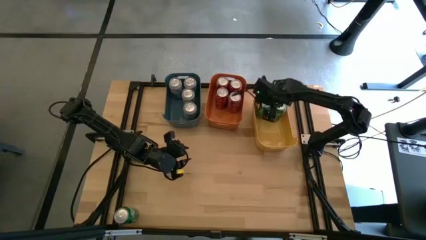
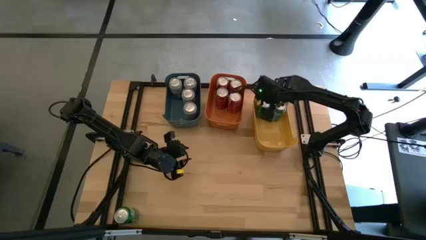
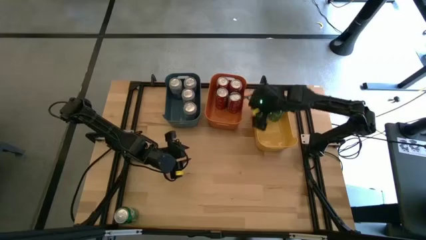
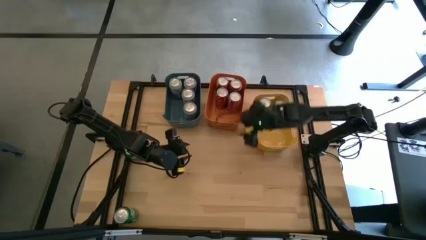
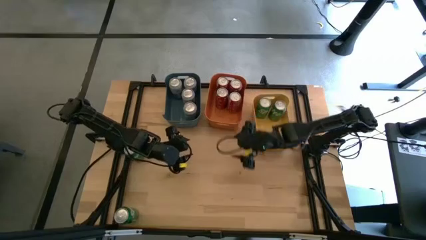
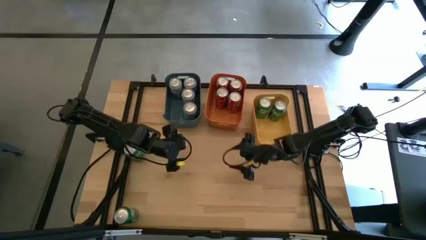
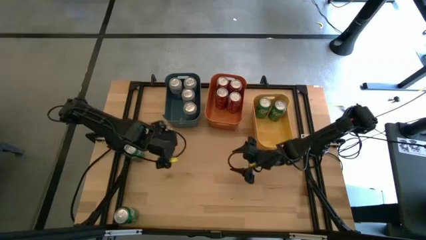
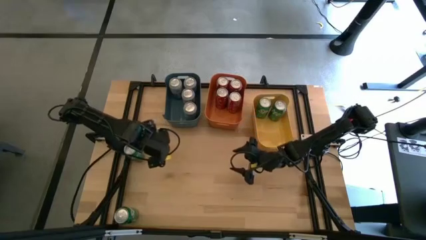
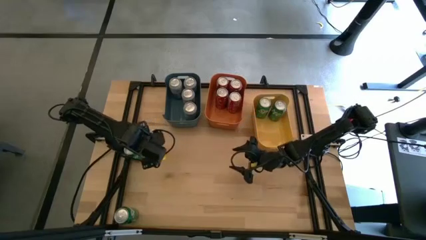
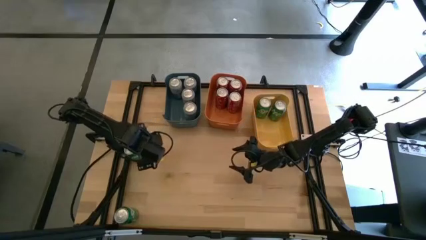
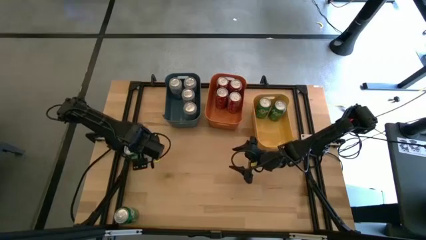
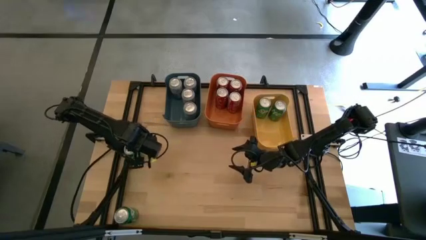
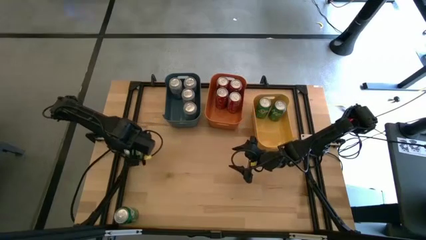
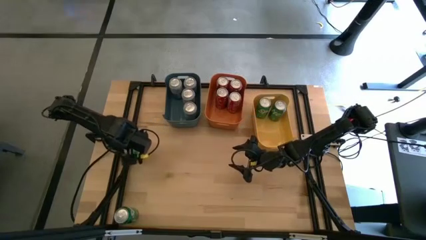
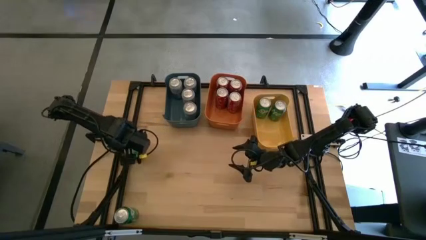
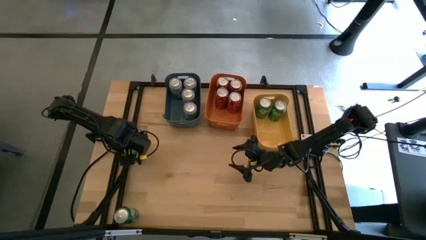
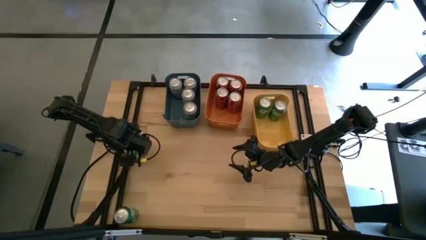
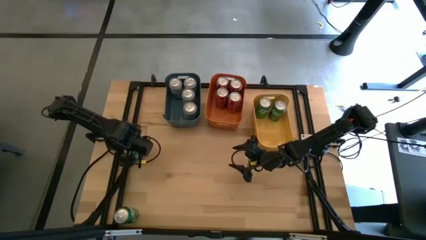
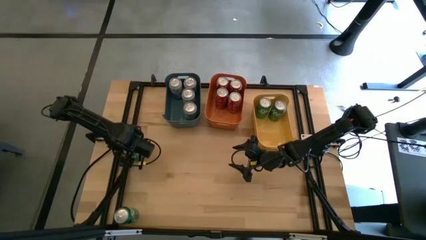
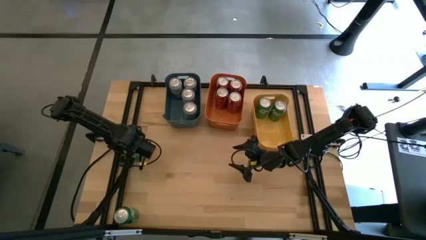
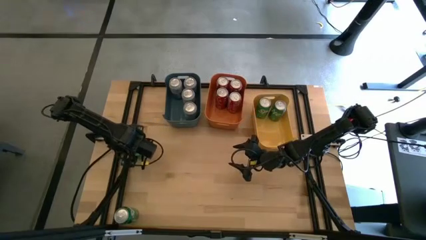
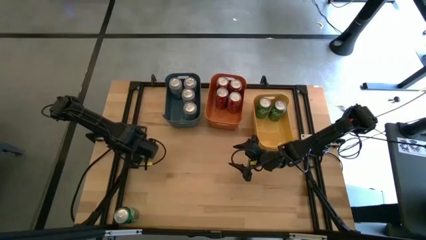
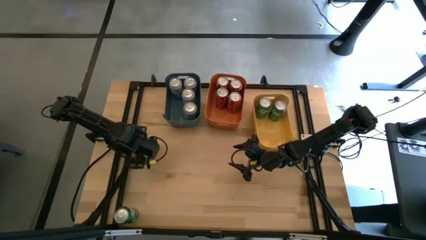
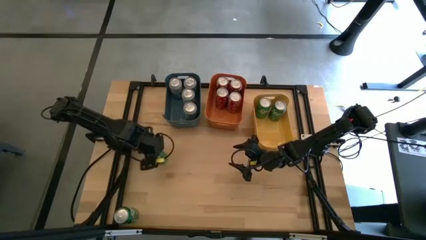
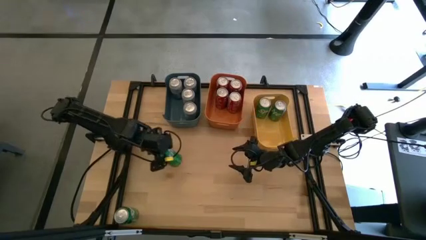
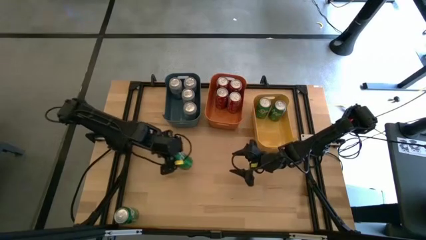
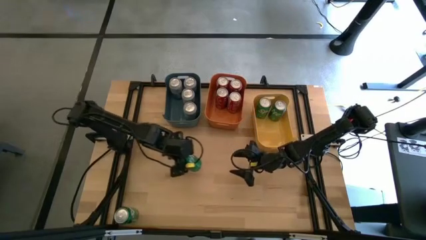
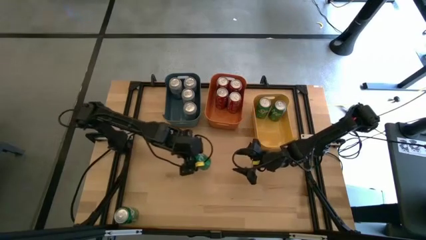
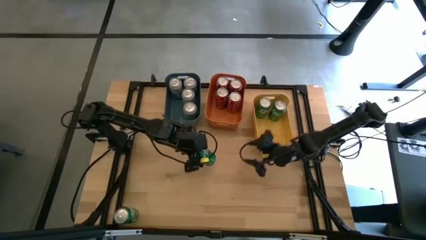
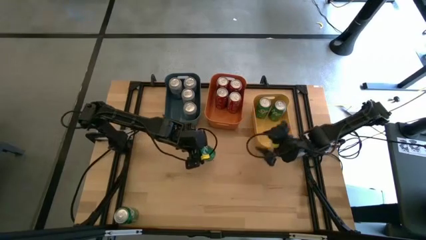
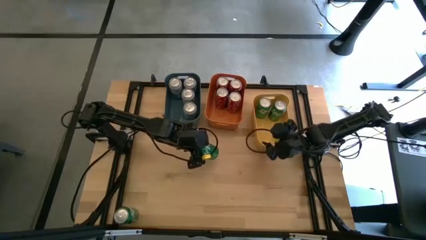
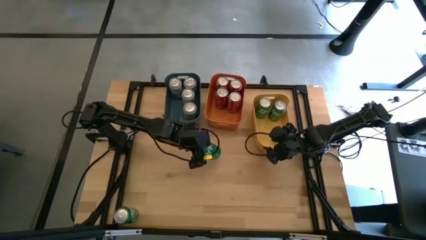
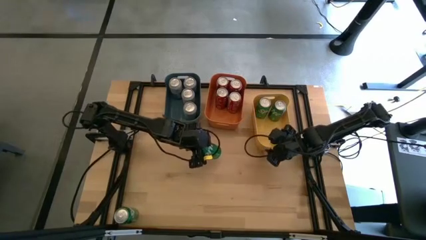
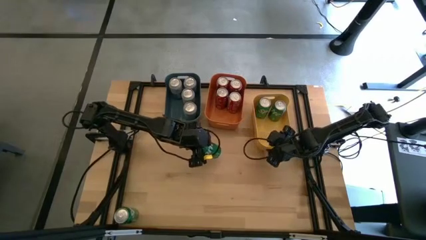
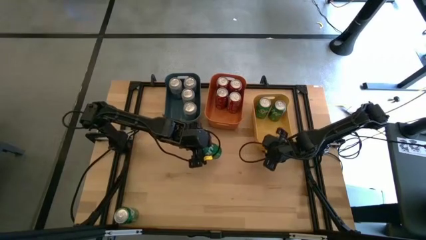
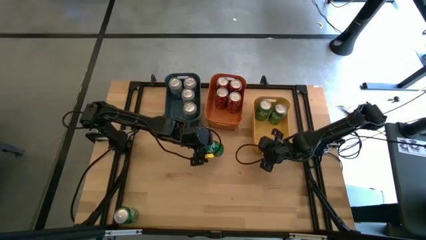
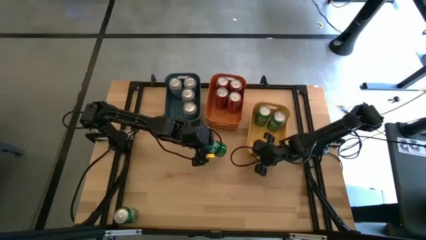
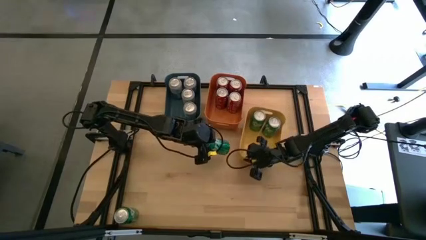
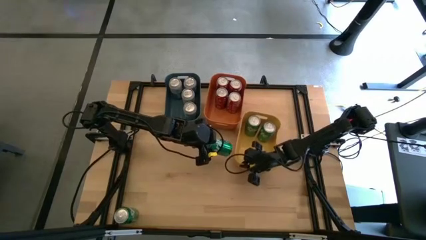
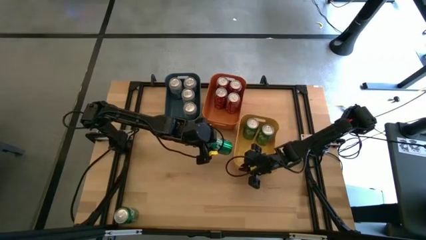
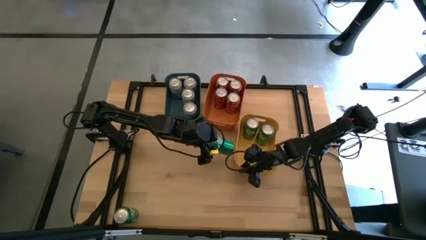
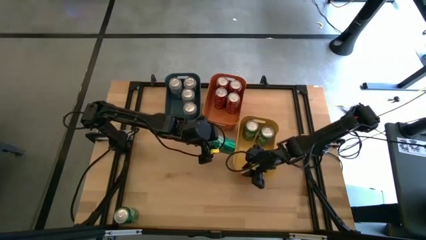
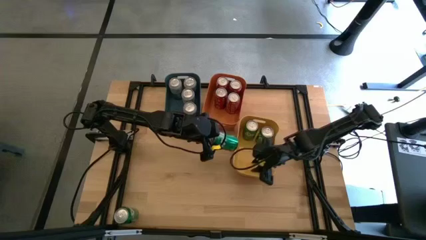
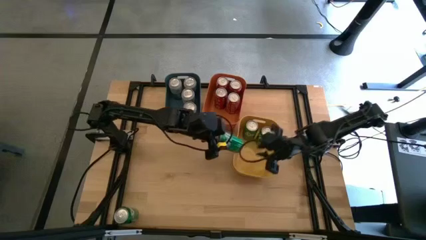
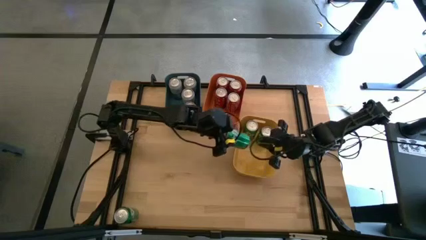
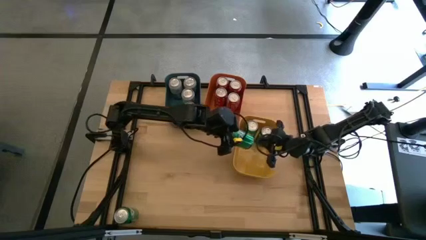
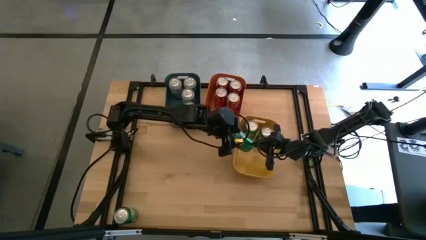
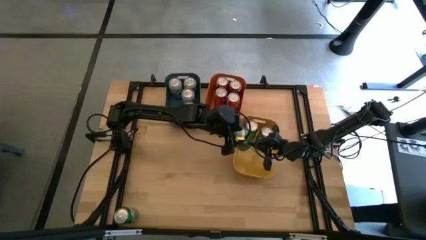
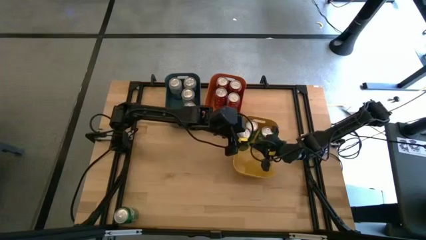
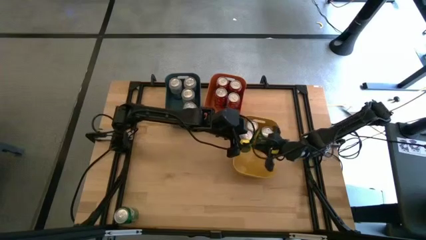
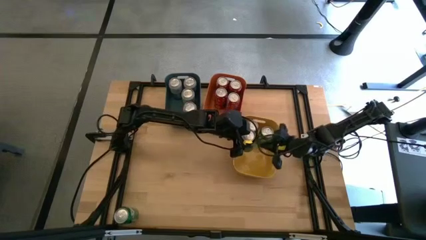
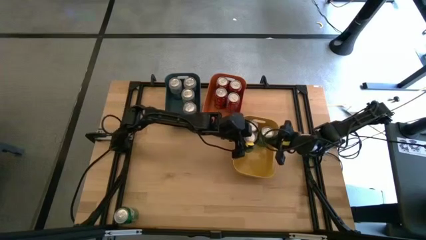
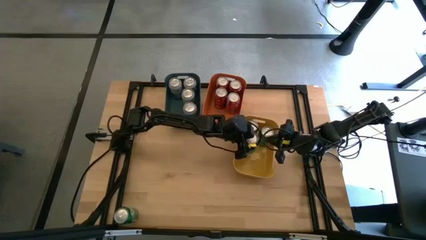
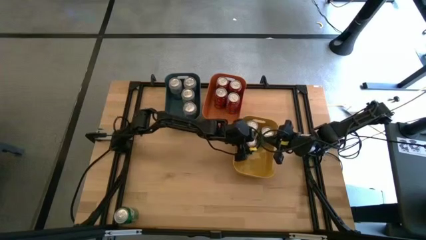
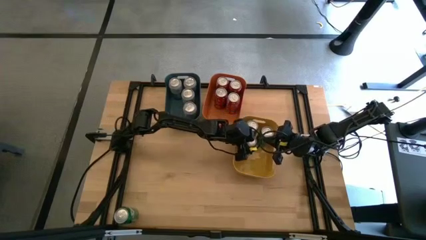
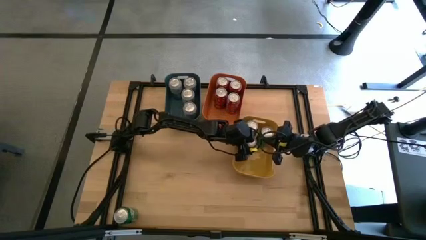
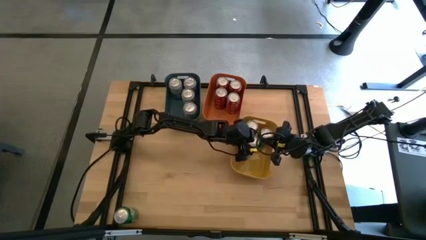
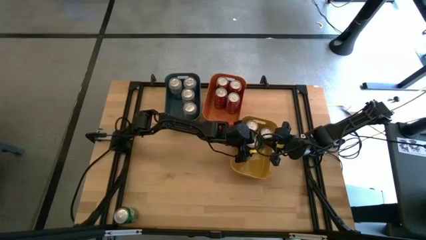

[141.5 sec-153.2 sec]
Task: Sort soda cans
Put the top green soda can into the yellow bin

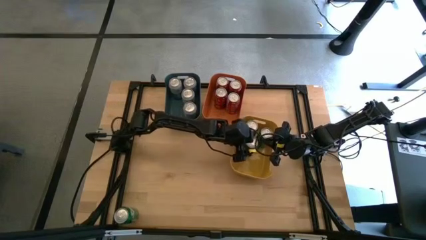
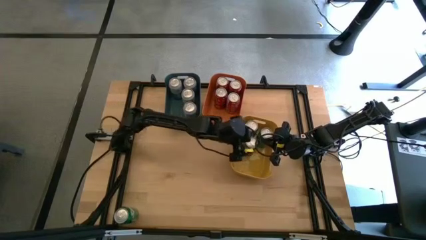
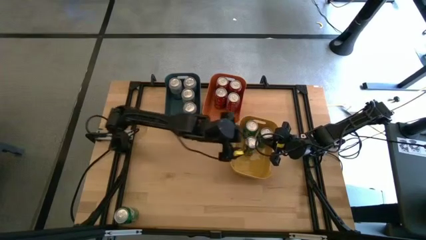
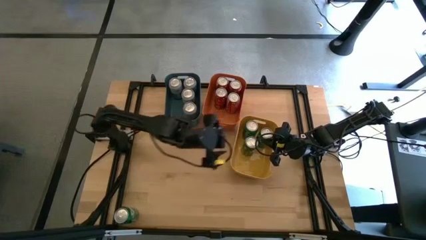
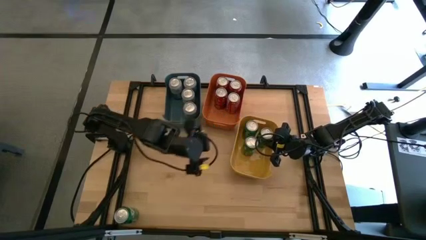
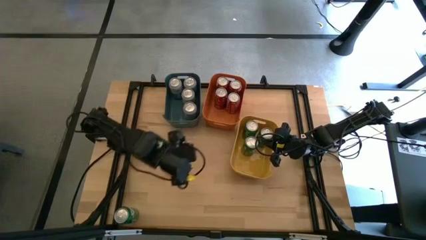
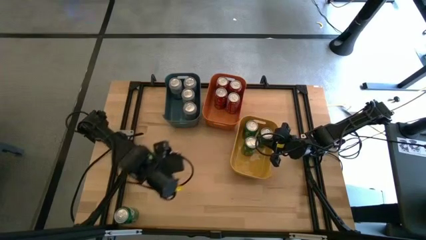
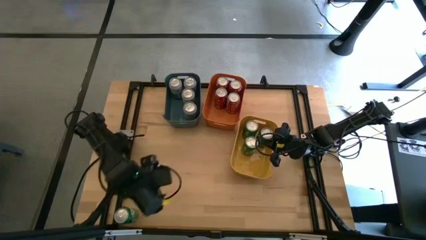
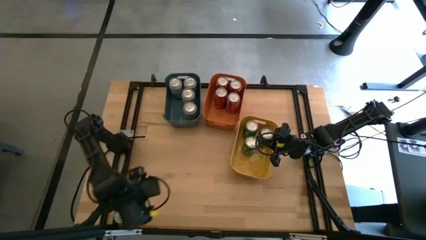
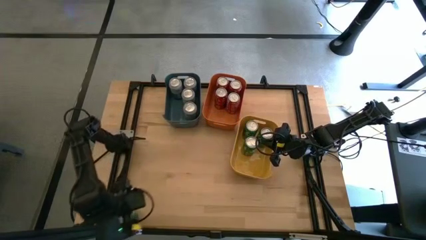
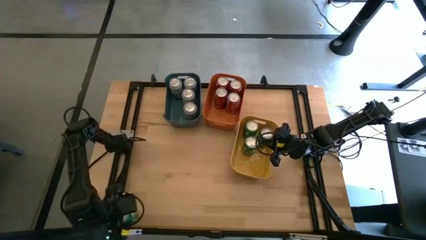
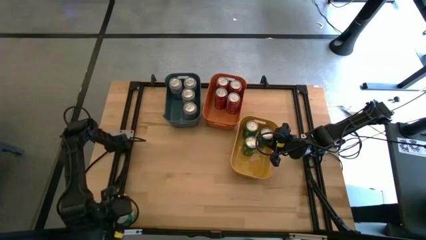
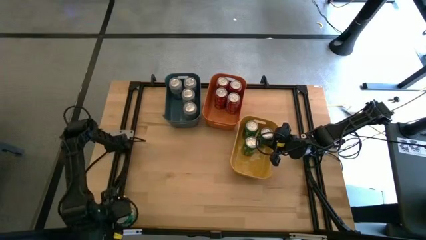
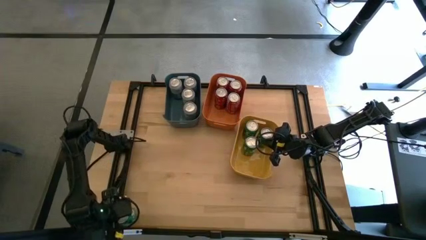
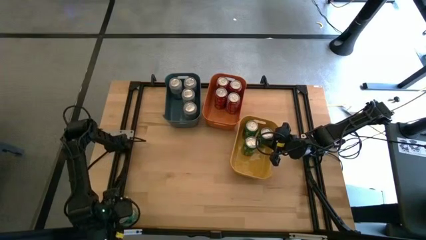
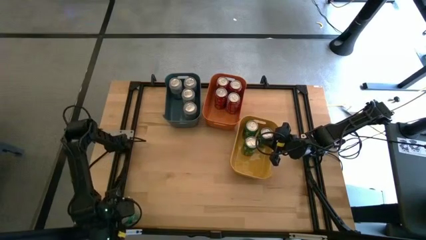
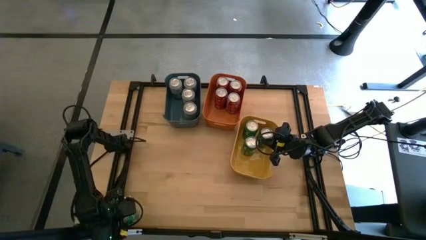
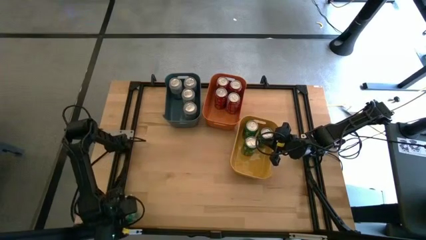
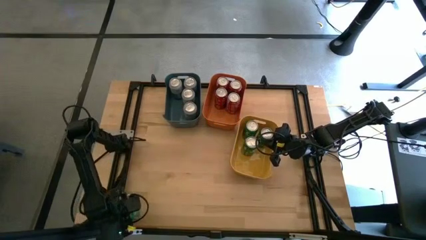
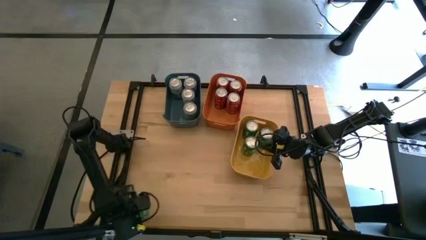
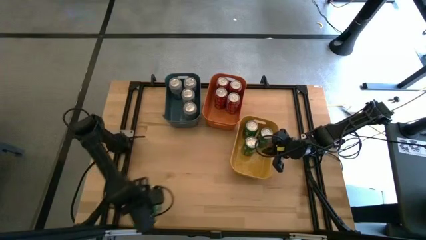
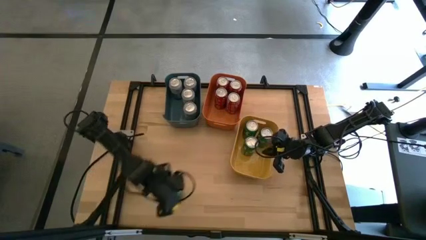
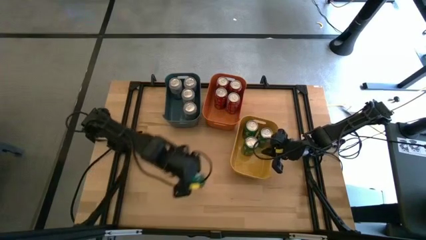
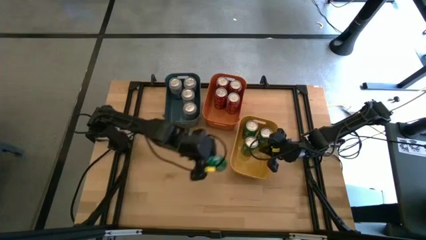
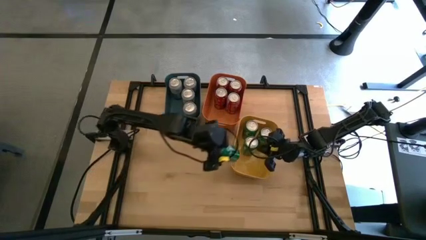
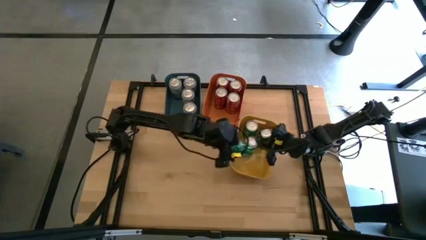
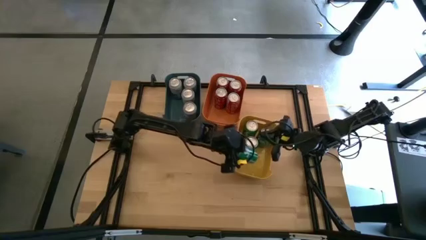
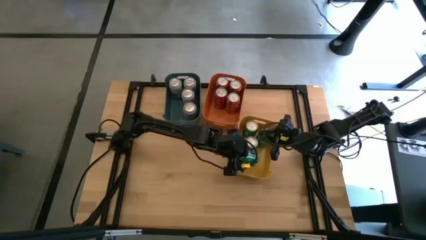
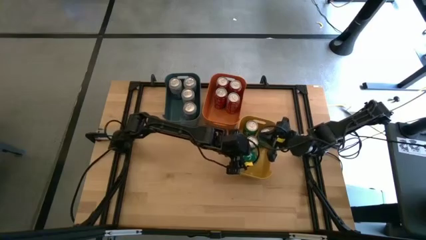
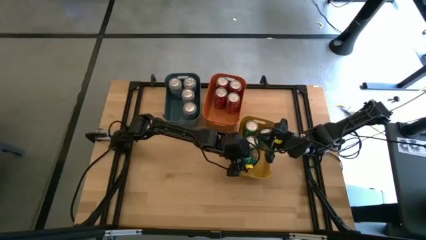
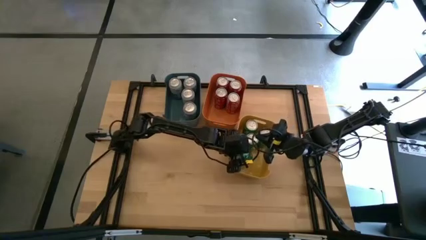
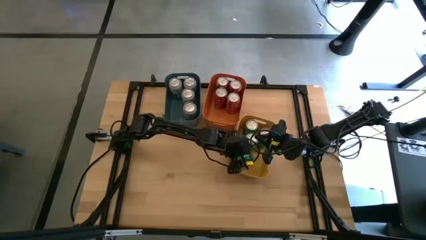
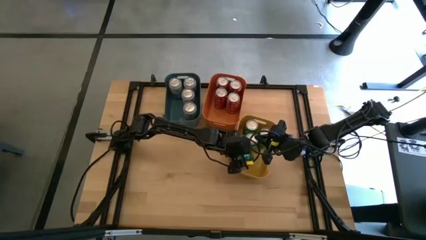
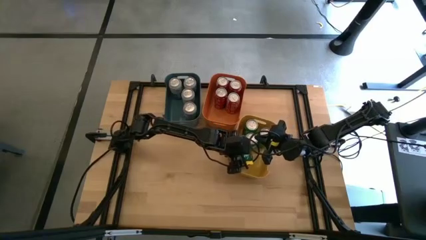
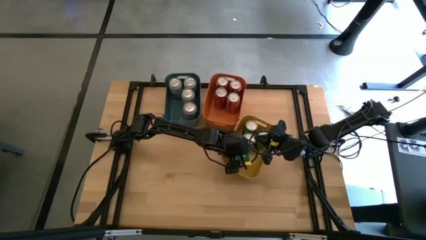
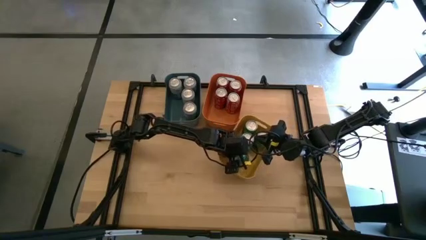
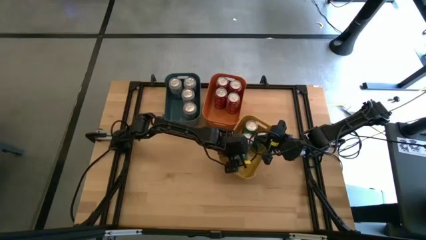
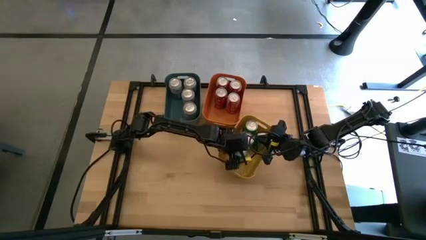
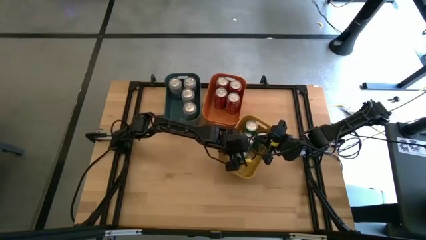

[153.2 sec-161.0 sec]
Put the green soda can into the yellow bin
